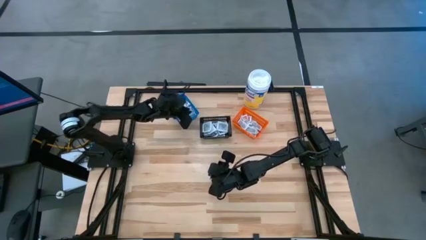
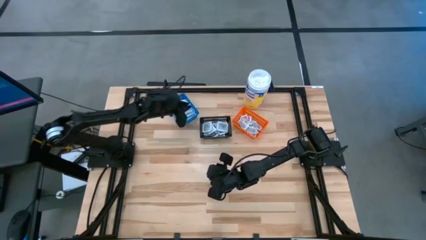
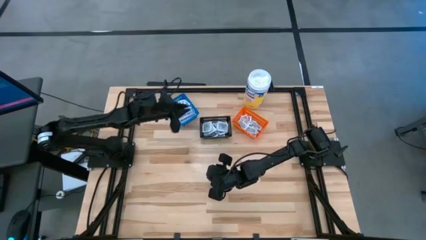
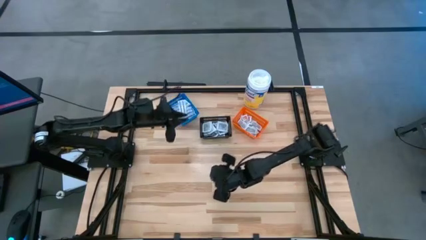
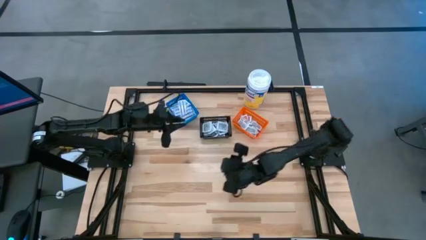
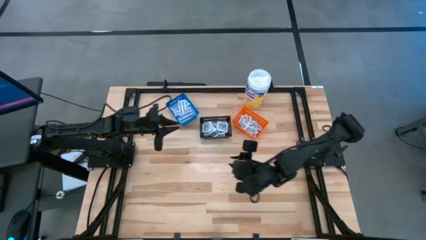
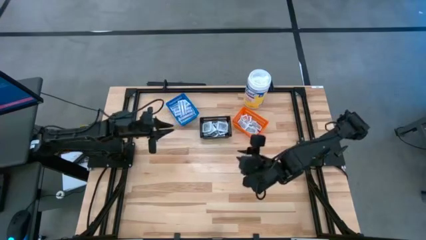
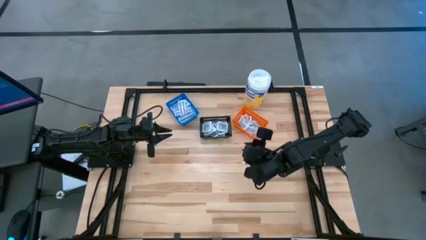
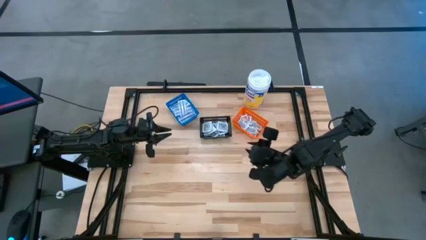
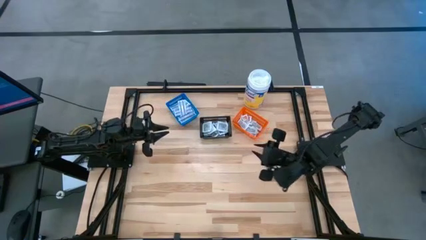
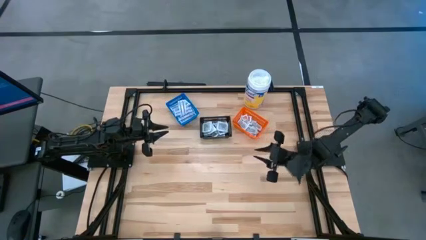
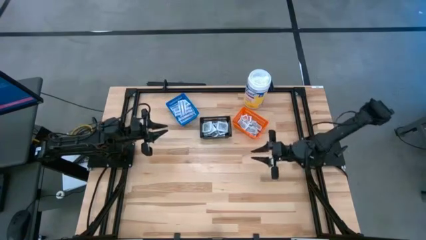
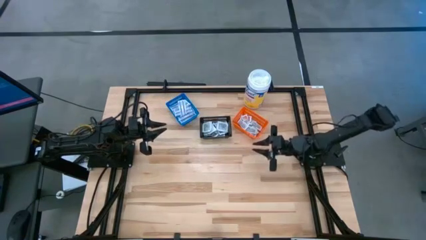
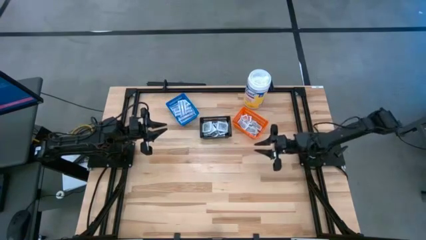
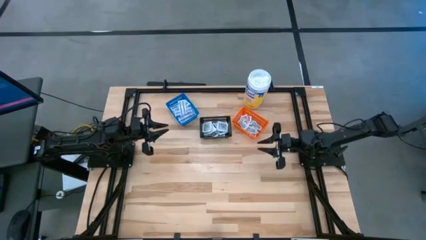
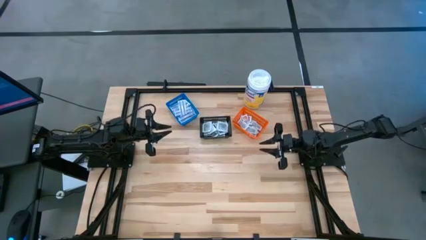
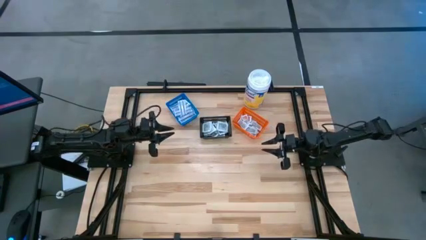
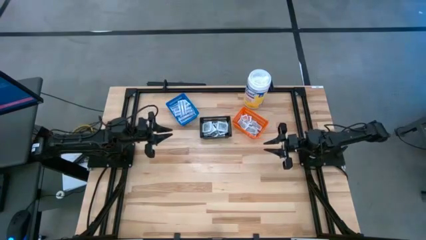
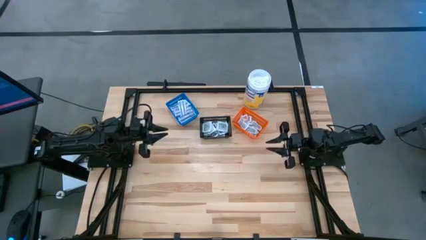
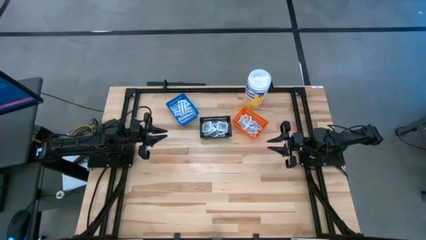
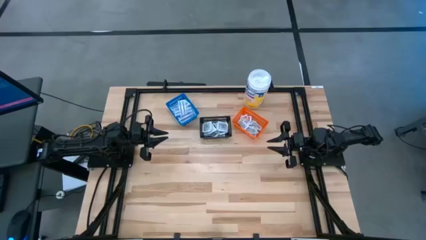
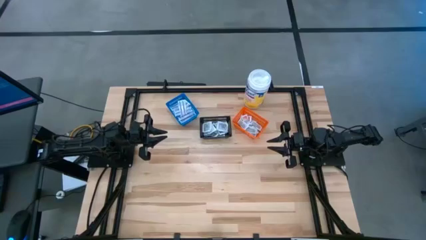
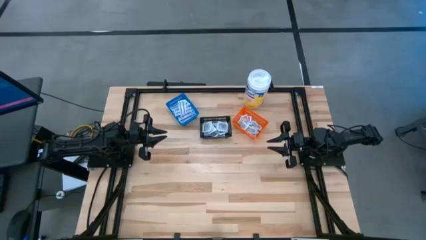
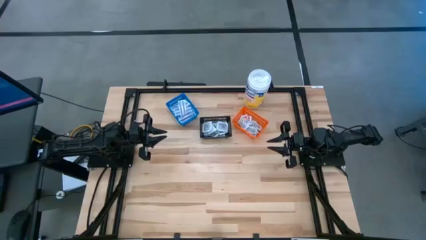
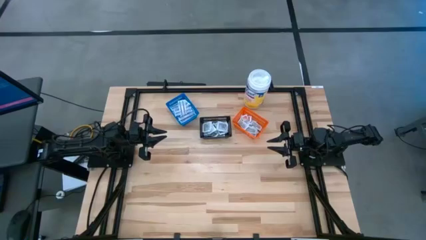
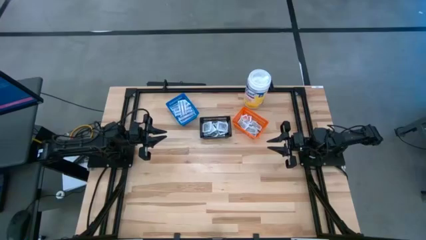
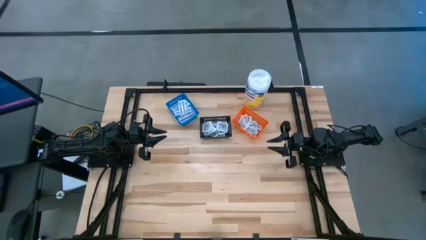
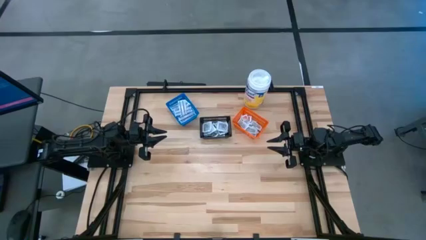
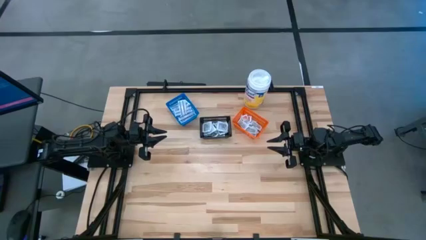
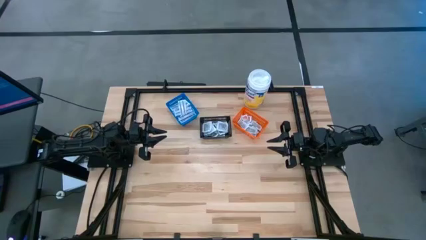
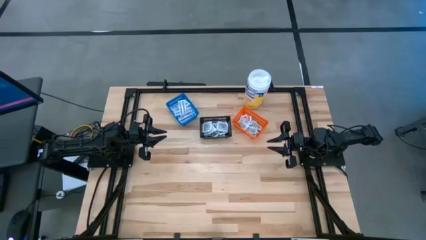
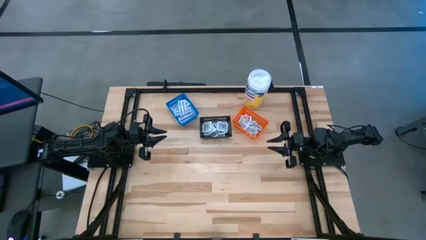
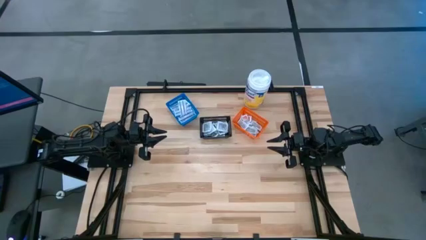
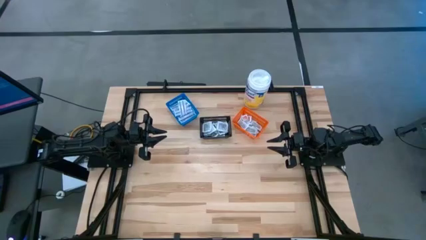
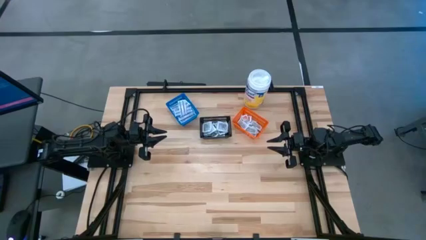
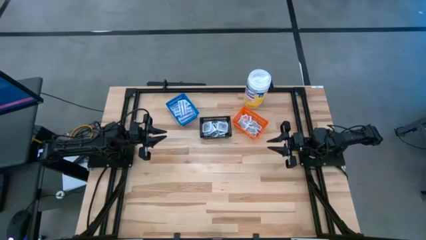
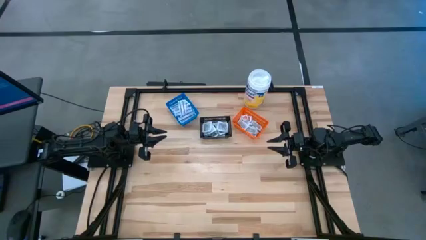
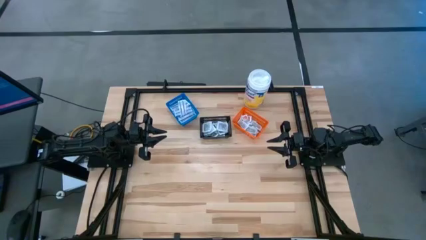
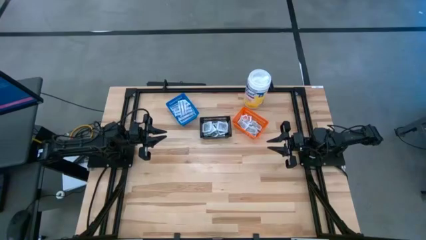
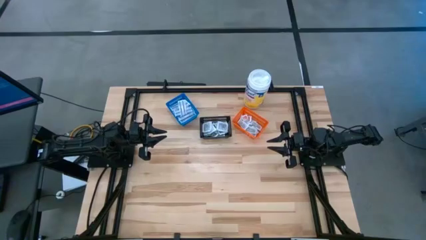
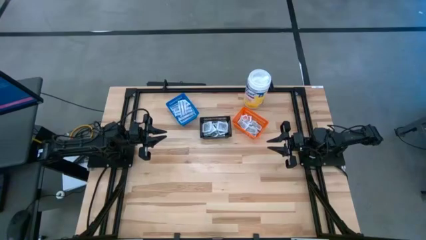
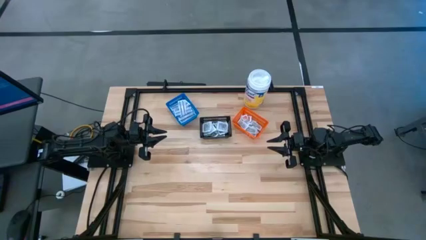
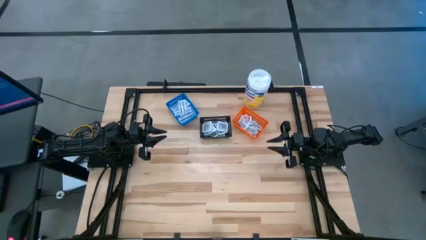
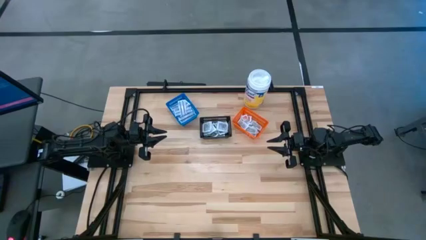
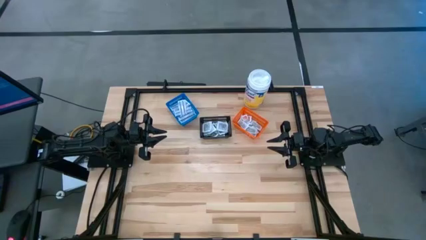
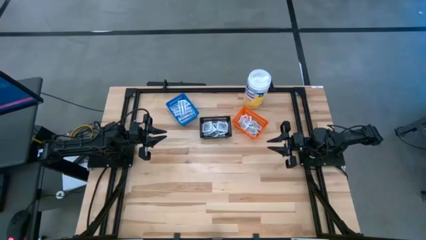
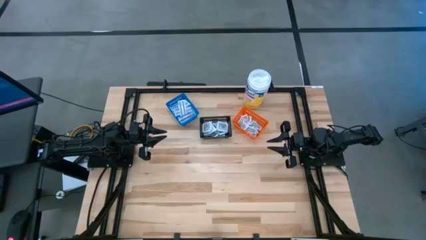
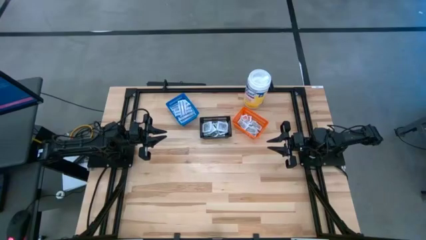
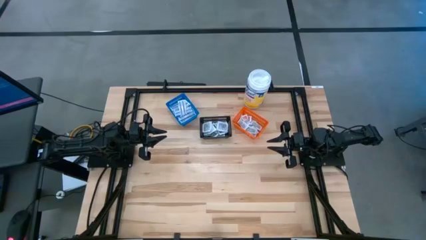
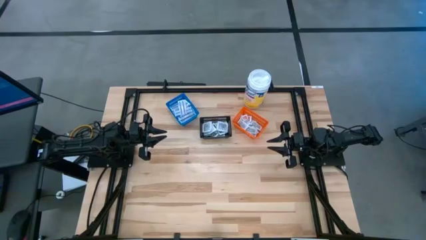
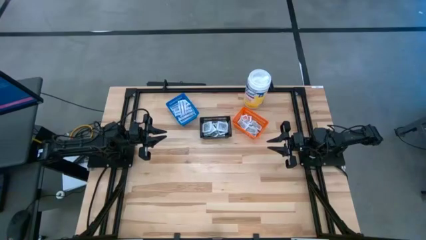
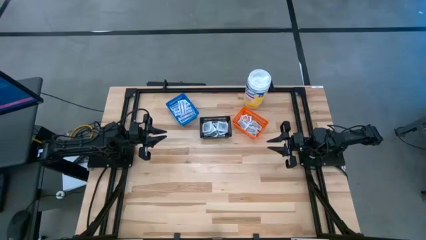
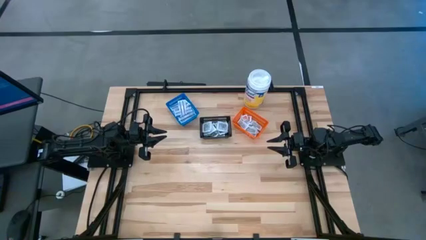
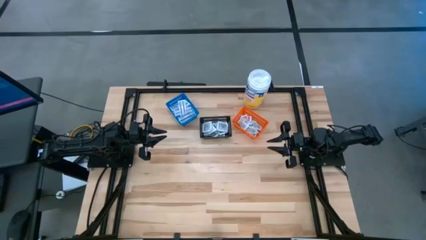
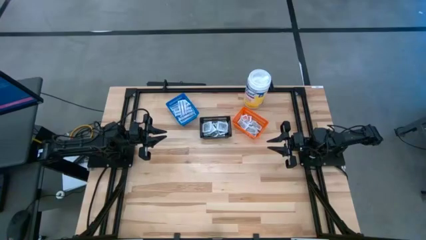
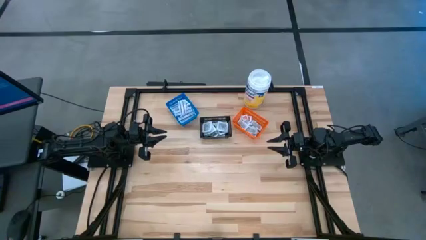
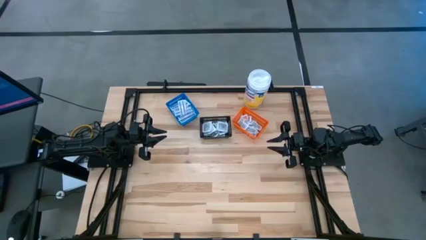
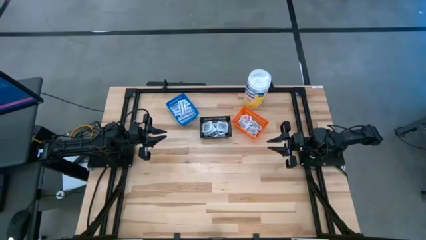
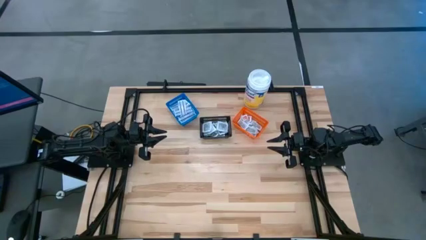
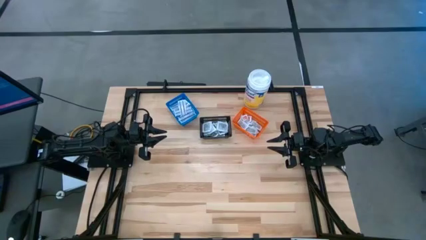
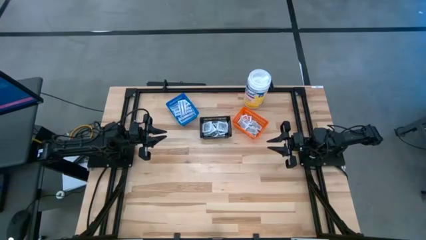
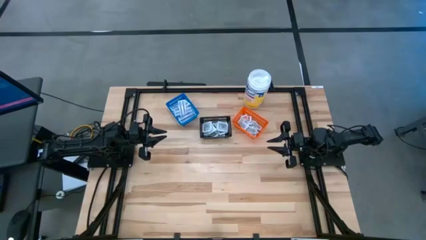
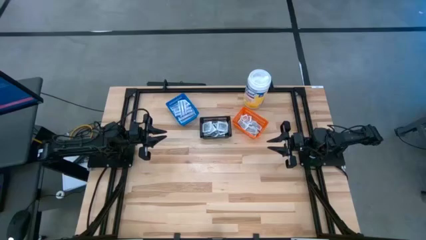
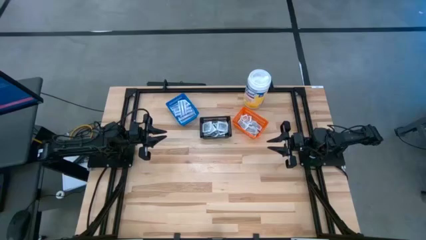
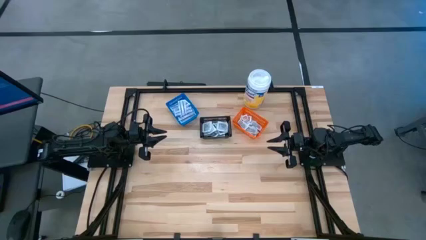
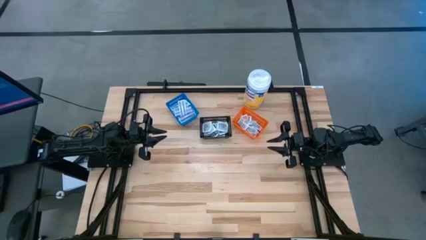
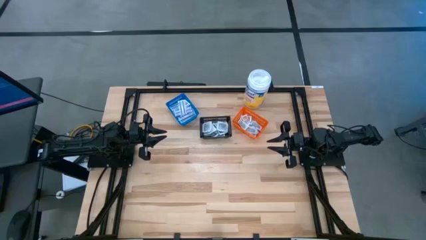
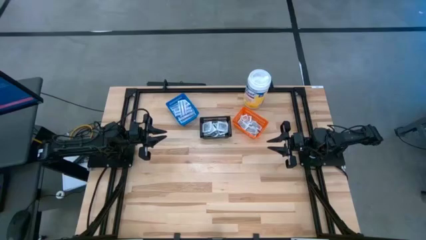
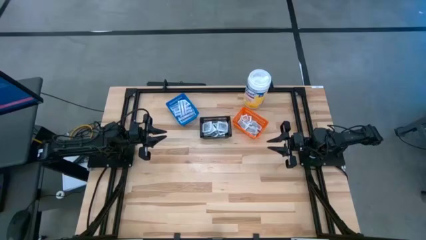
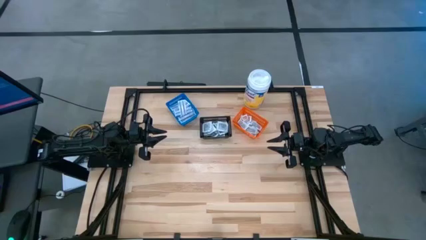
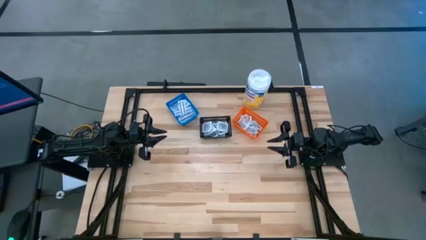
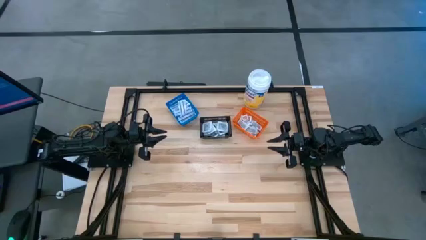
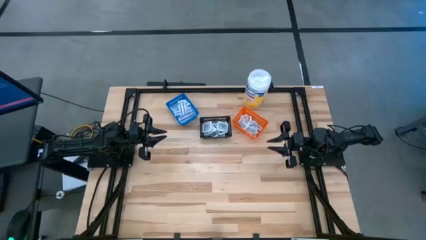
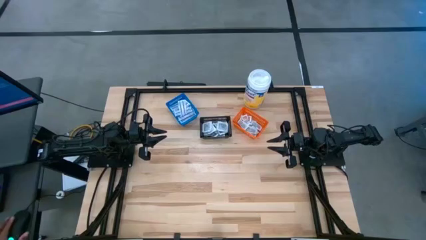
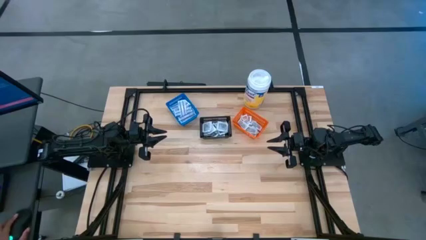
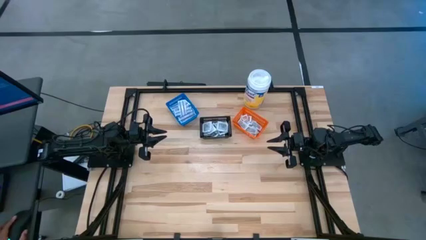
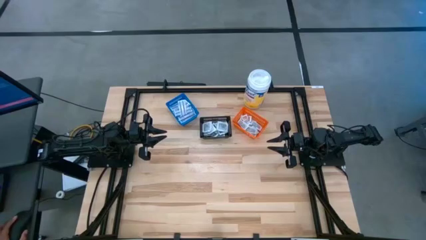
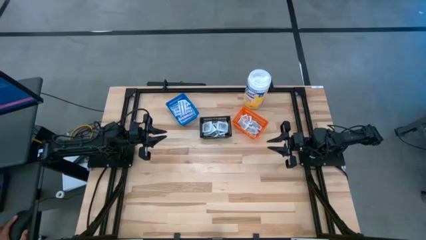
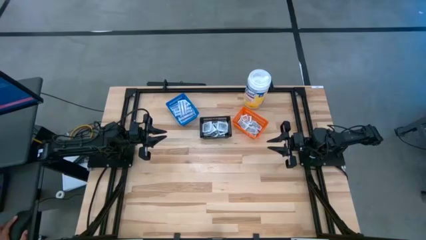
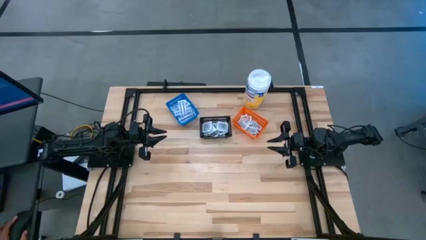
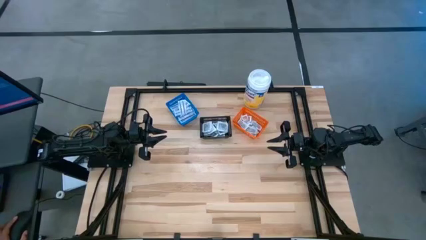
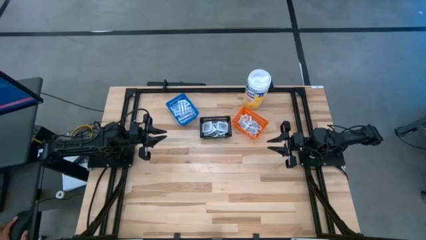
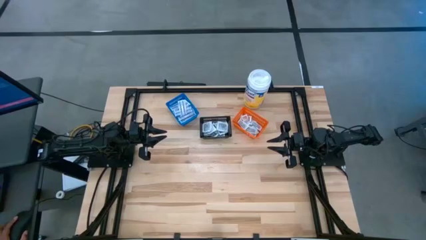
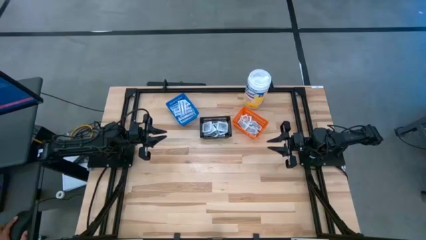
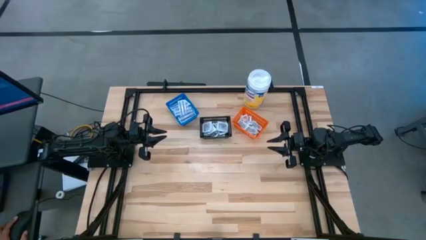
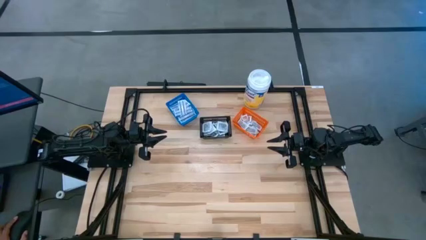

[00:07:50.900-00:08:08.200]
Task: Pick & Place First Aid Supplies
Return to Home Position
